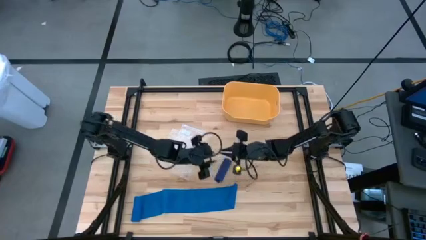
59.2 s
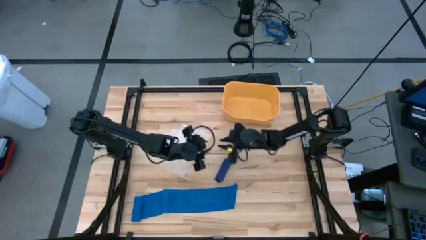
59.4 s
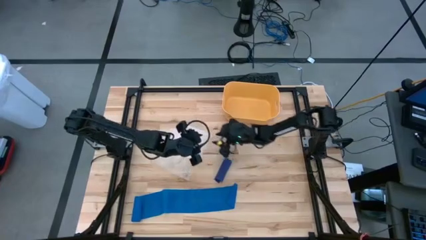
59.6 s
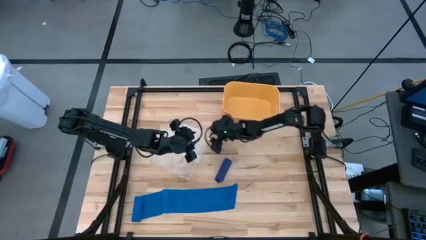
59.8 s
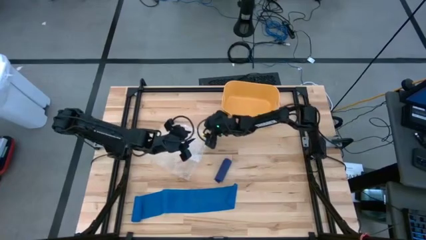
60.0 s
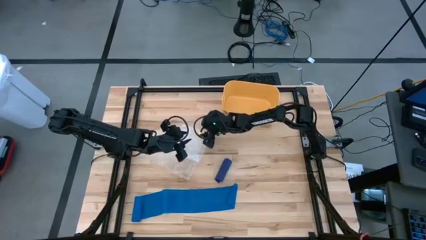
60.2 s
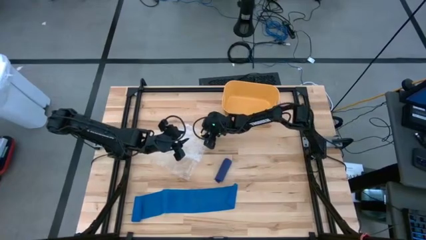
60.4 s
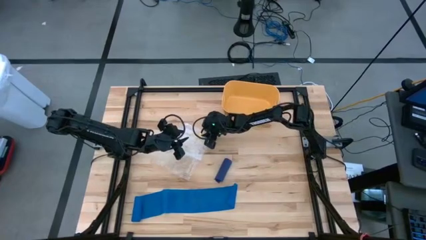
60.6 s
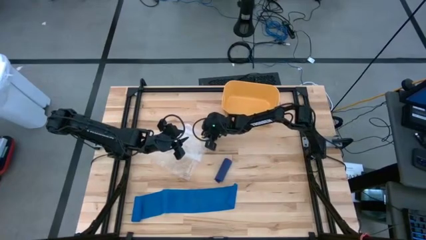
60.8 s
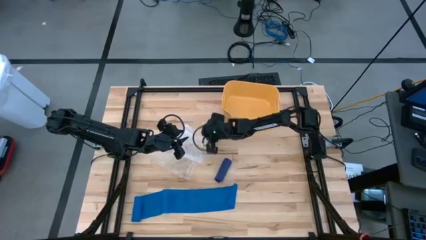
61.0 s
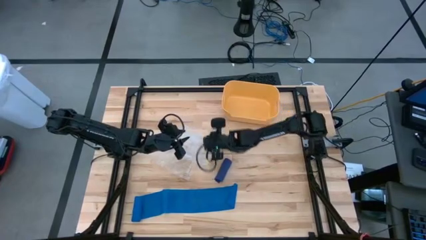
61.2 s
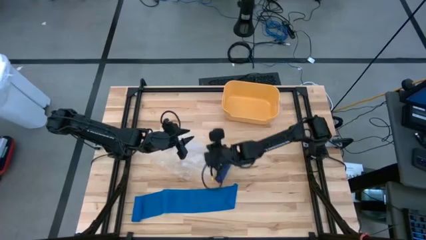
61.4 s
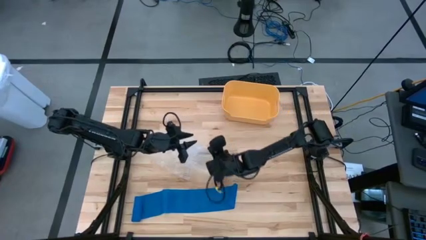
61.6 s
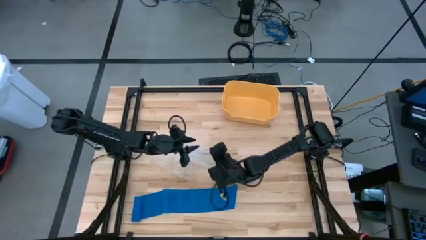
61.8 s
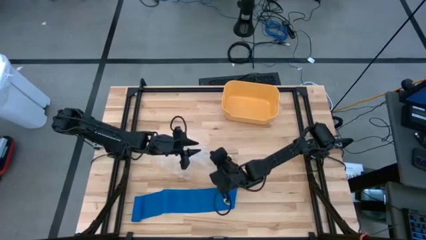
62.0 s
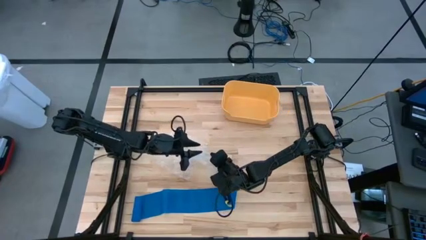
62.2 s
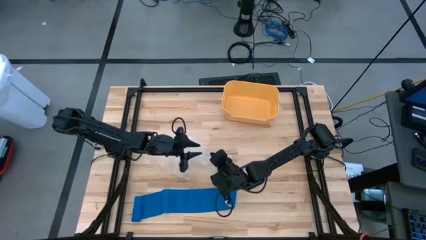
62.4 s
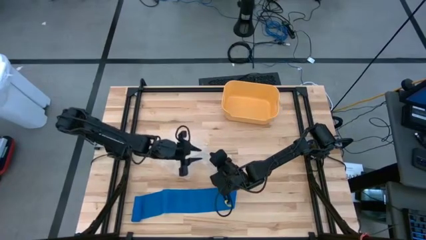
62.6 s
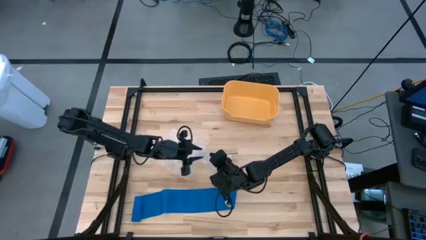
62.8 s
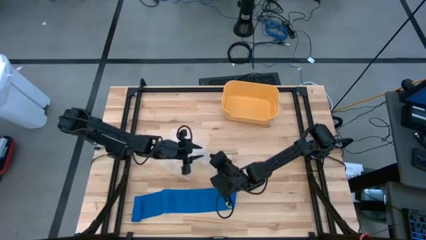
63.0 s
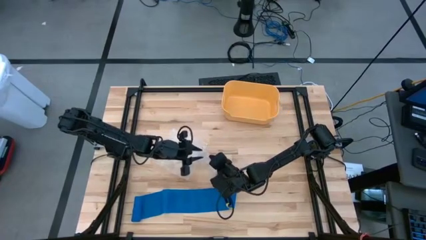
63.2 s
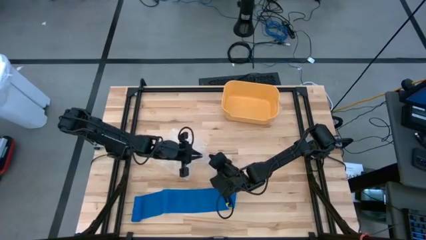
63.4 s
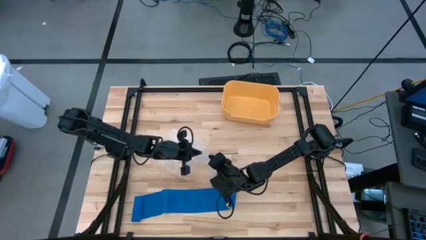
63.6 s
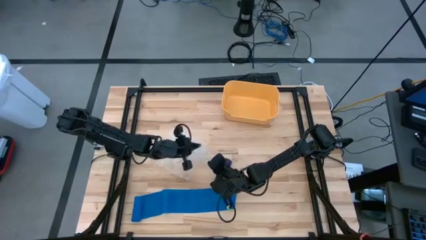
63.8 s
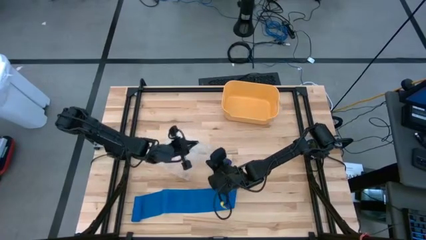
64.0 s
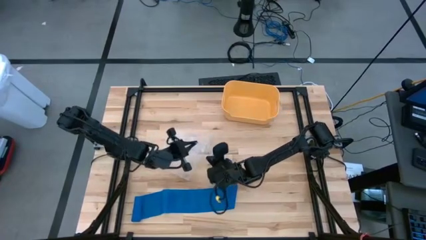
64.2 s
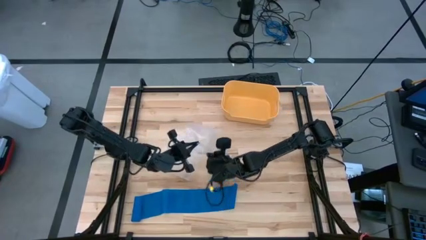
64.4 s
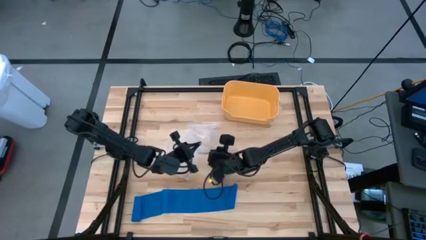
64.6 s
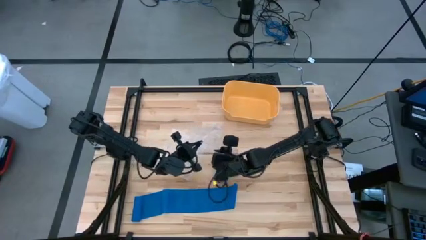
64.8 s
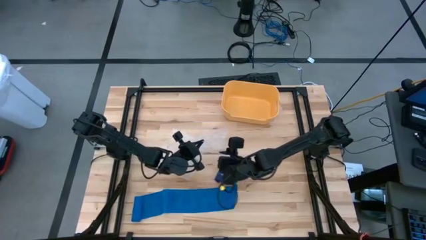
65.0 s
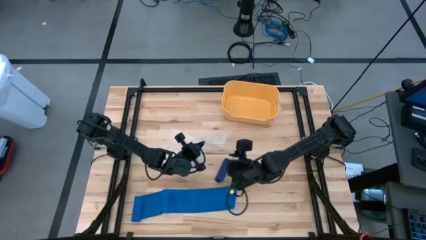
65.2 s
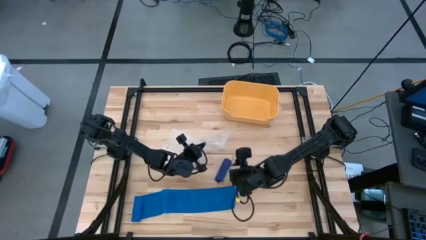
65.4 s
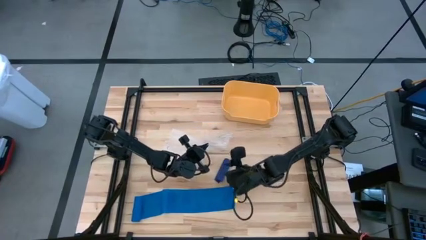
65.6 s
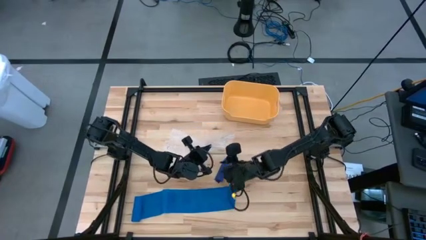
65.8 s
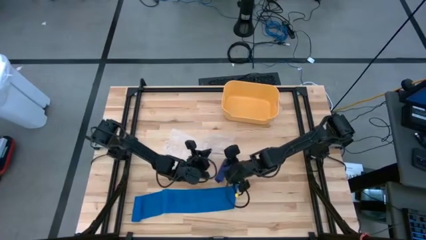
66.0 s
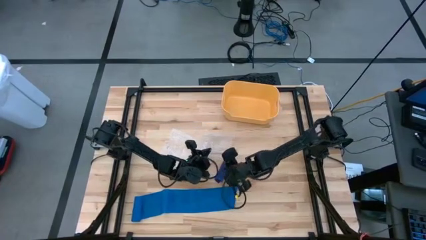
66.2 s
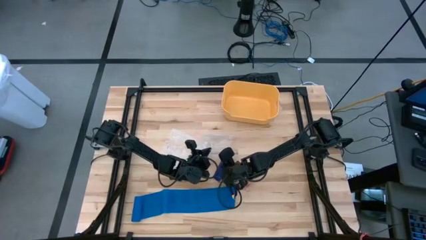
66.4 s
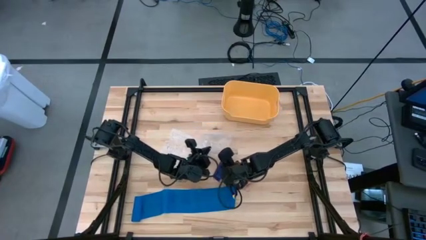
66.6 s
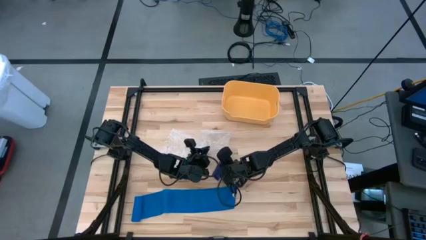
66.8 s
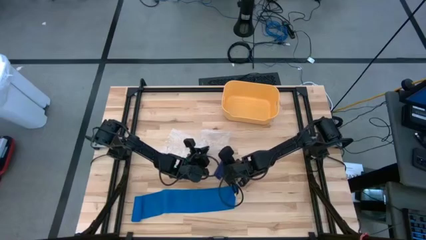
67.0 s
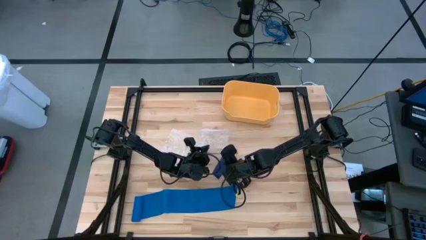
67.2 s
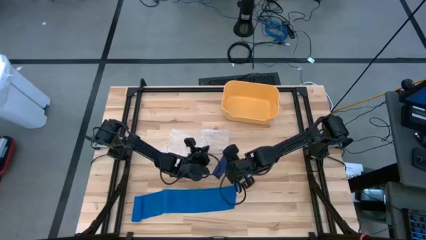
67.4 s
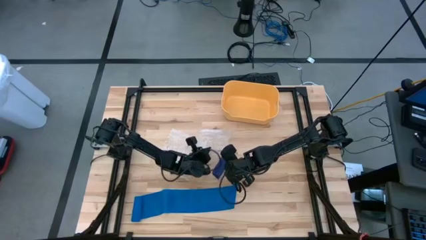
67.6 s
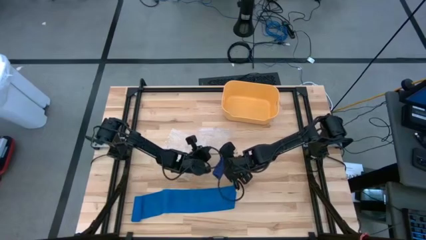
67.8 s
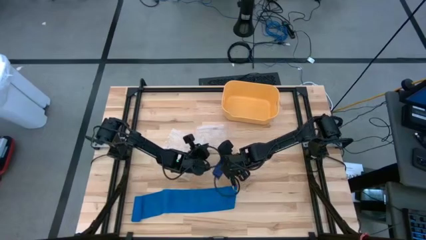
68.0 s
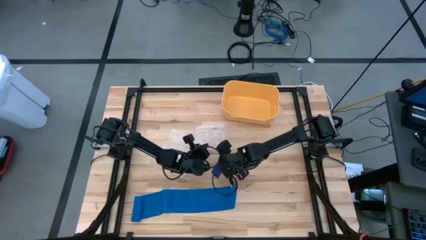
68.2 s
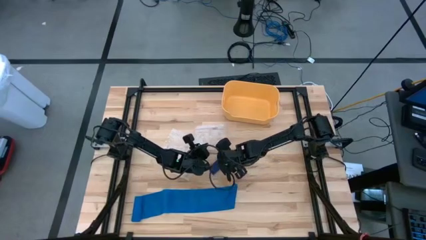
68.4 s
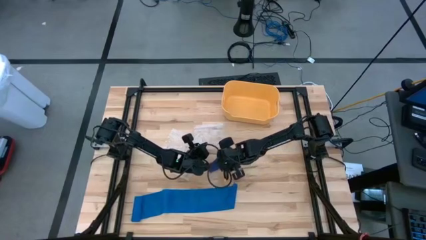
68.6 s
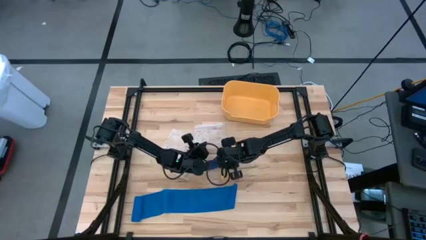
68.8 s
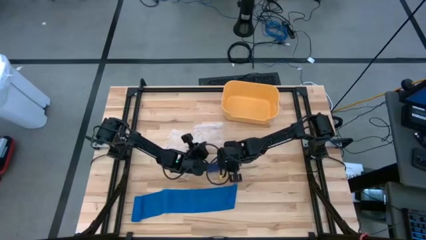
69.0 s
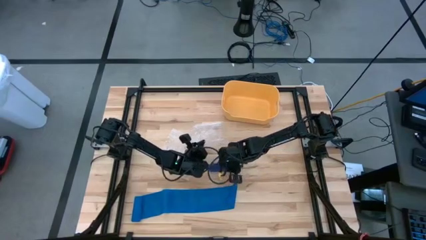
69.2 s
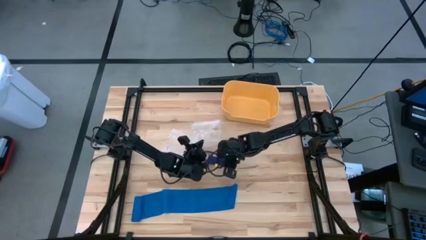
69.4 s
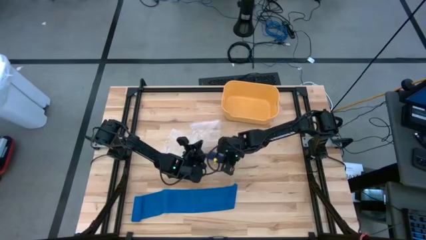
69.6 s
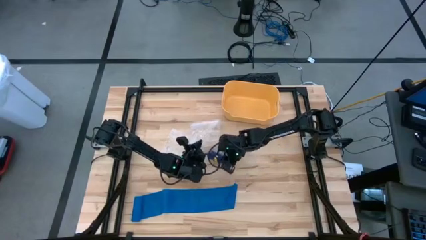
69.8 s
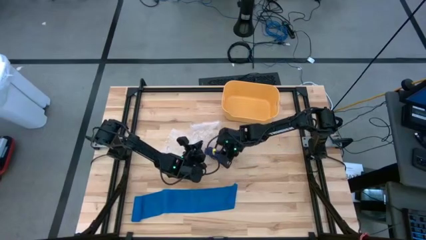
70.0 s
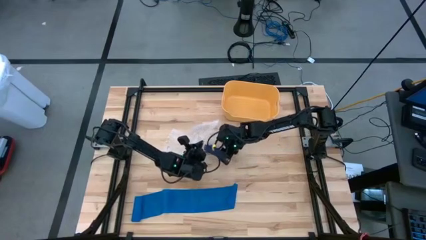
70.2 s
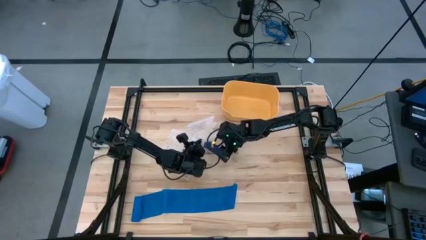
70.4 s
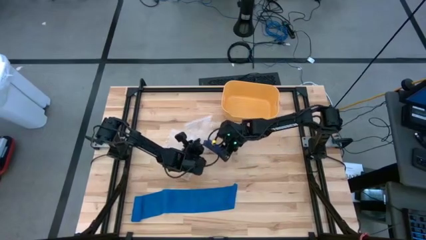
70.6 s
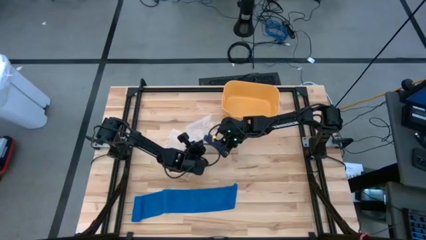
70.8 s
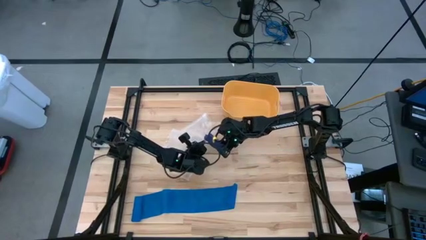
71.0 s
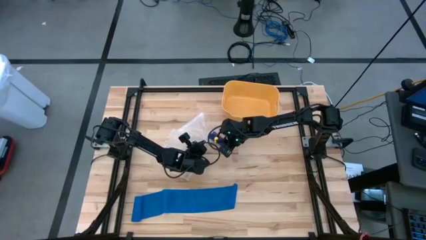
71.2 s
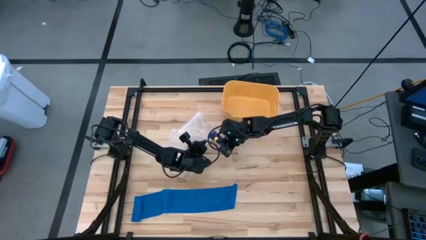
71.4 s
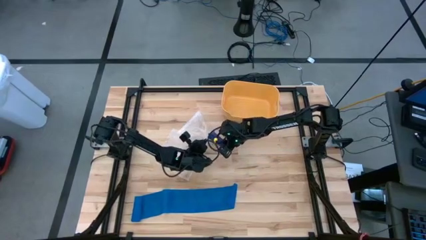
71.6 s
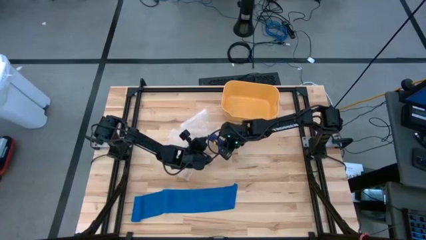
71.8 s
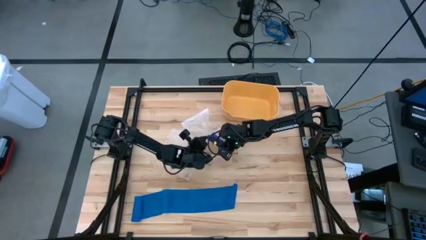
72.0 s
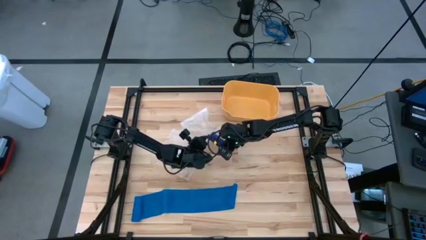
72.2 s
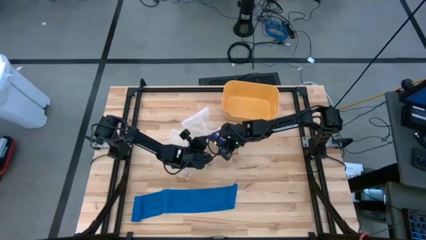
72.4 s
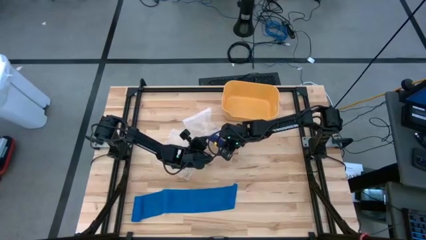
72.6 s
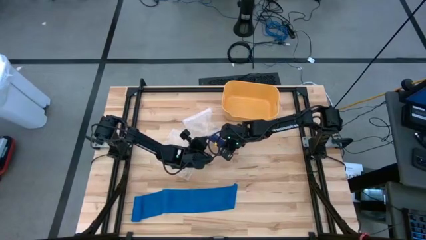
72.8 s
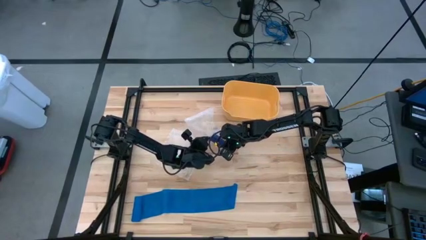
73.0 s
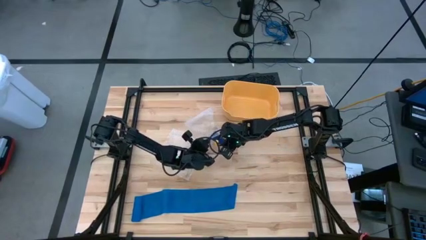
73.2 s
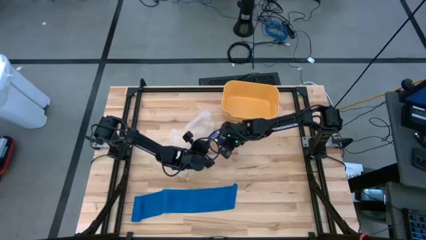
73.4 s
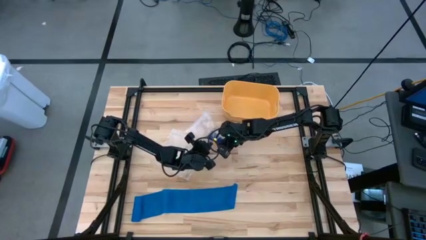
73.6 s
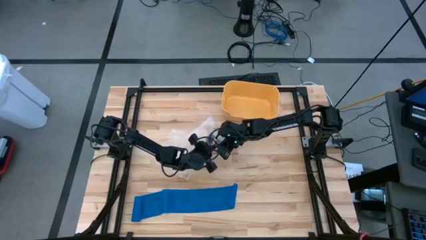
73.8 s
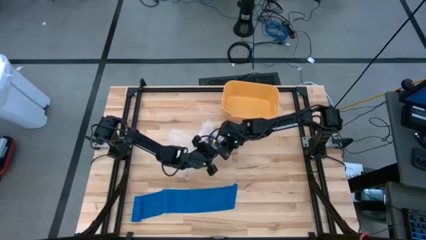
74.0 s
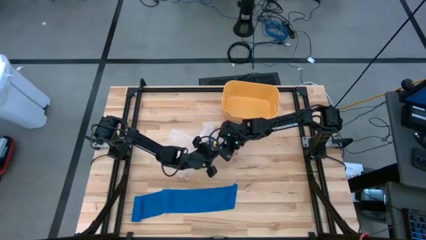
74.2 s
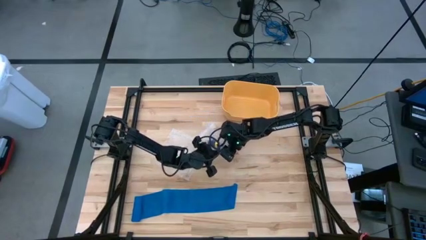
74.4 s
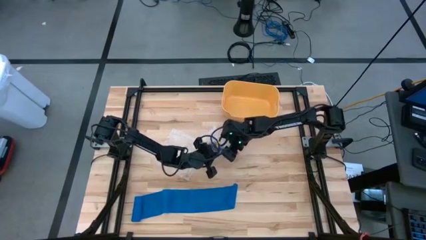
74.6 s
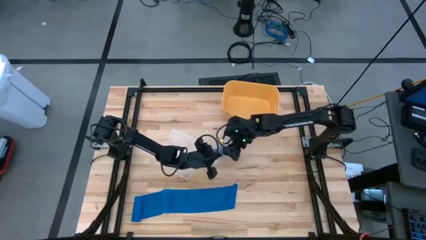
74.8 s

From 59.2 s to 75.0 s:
Task: Roll bandage
Put the dark blue bandage into the zip bag
